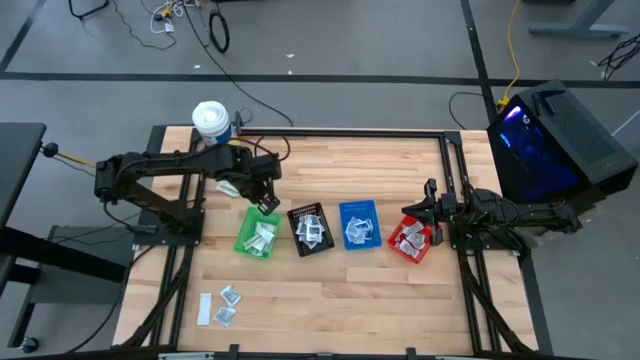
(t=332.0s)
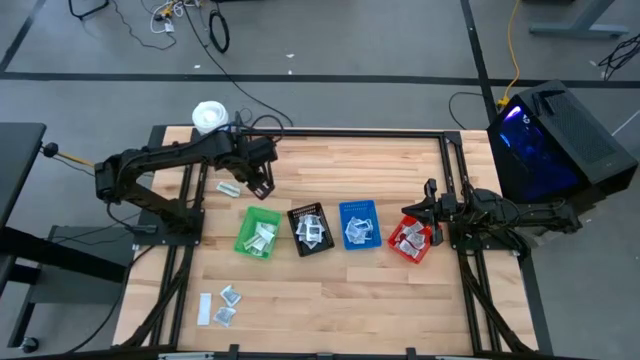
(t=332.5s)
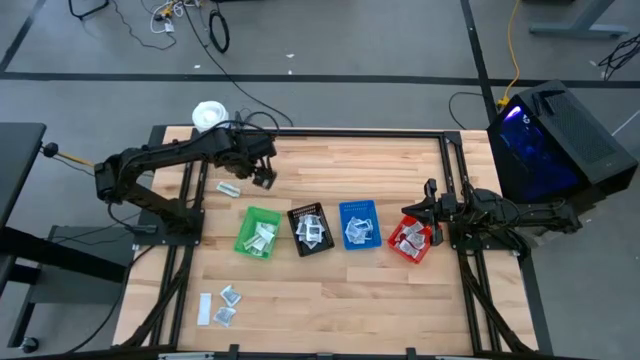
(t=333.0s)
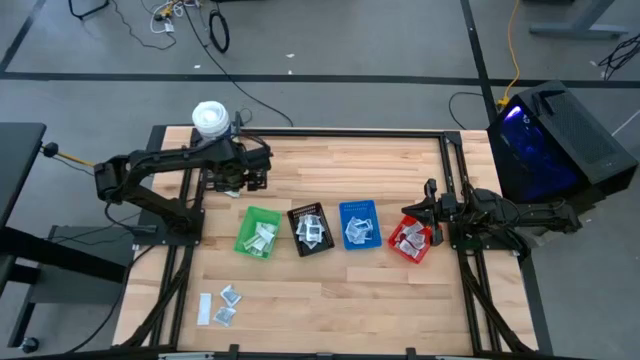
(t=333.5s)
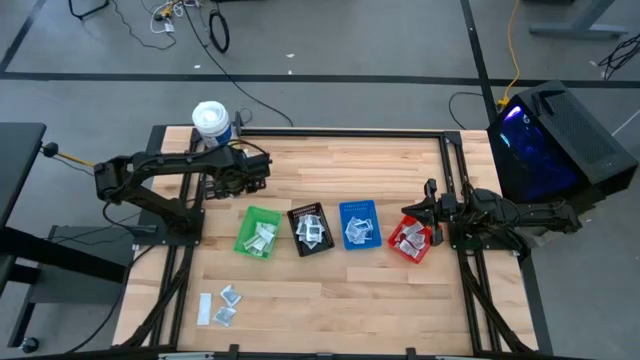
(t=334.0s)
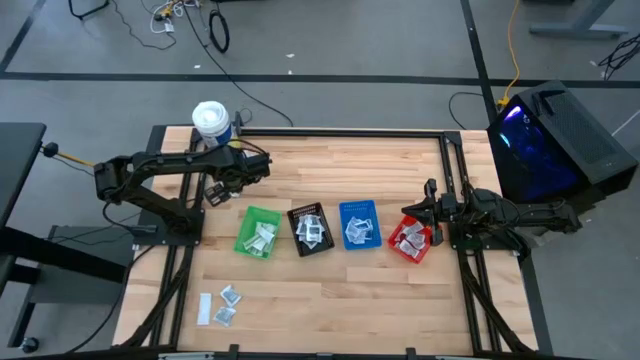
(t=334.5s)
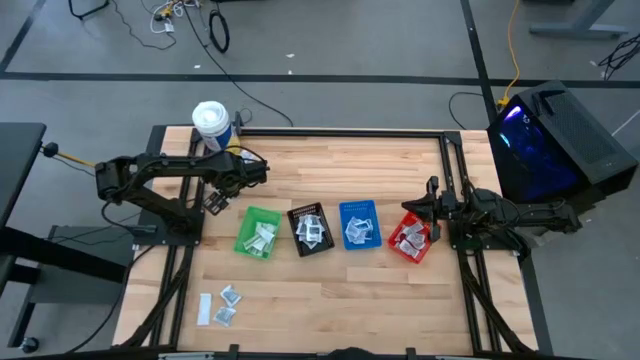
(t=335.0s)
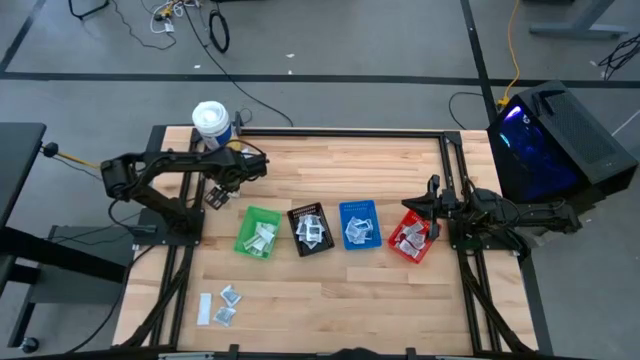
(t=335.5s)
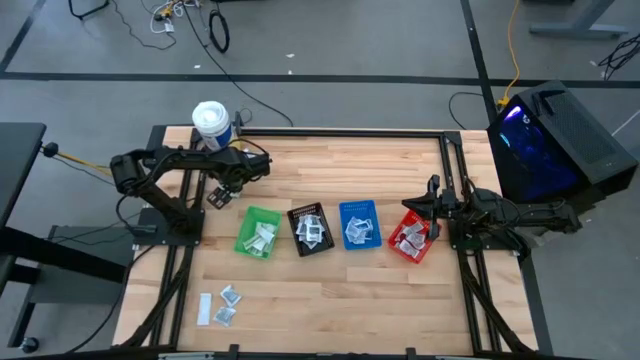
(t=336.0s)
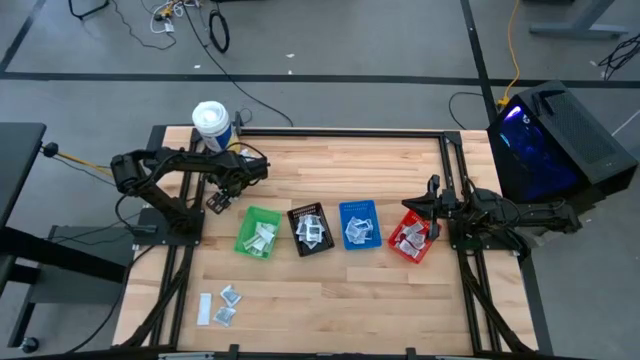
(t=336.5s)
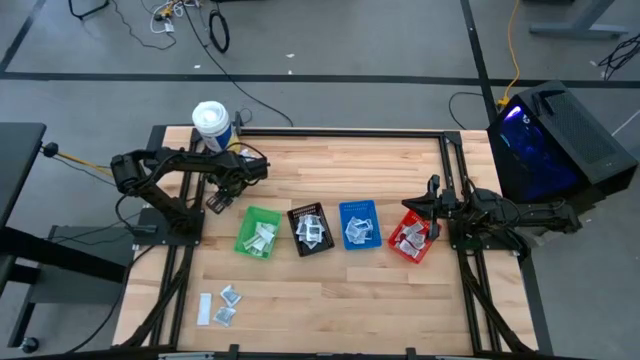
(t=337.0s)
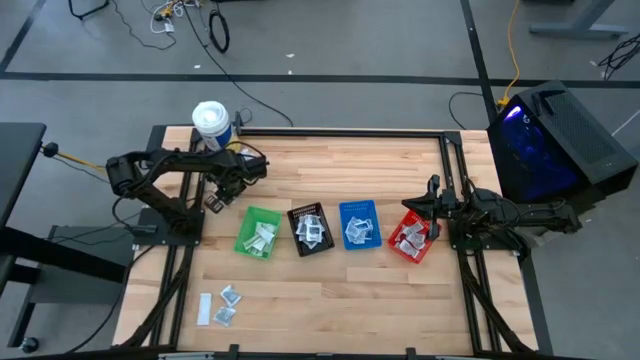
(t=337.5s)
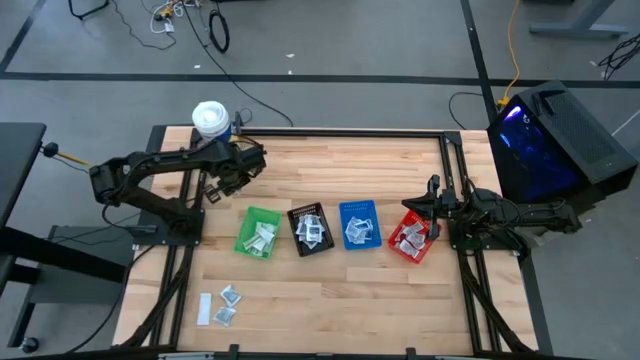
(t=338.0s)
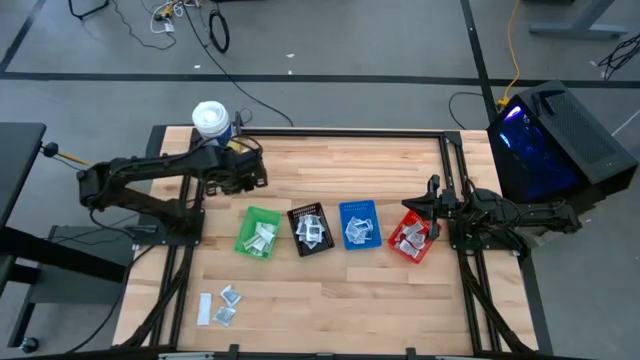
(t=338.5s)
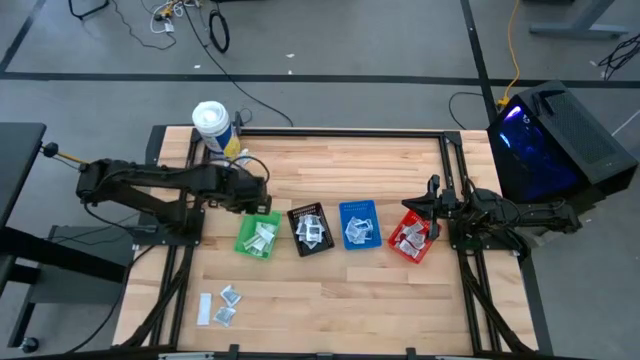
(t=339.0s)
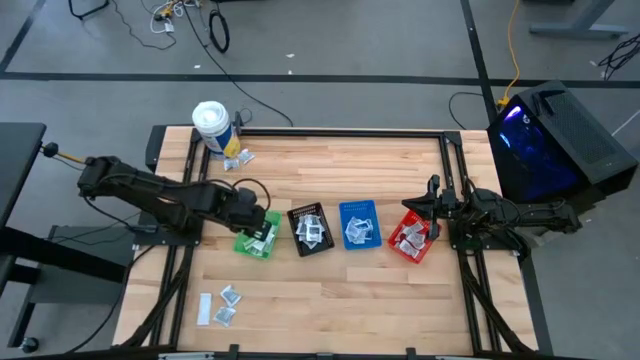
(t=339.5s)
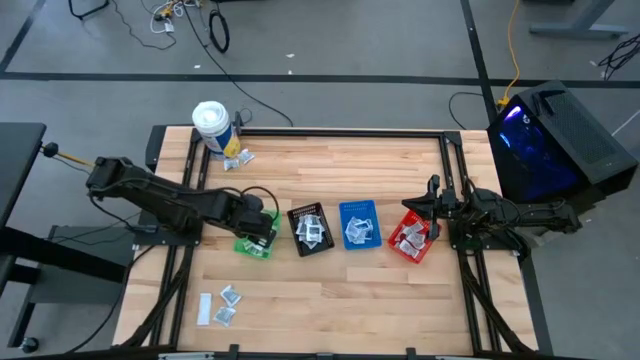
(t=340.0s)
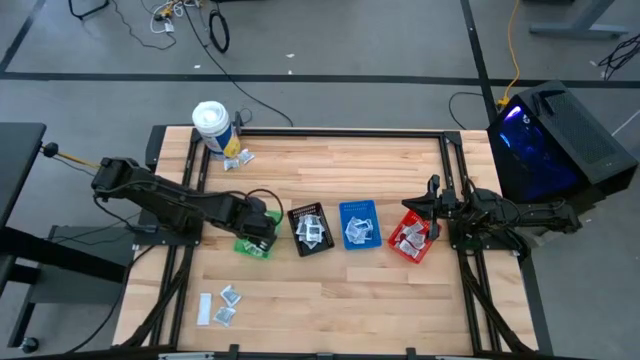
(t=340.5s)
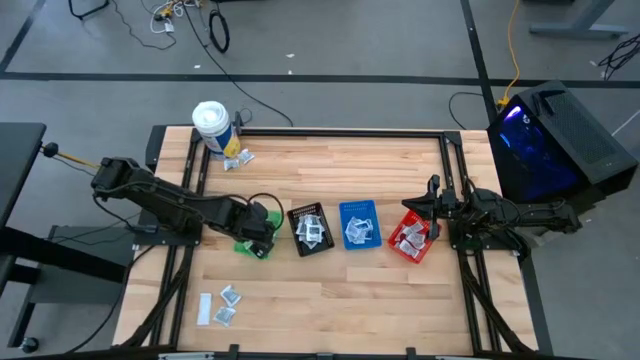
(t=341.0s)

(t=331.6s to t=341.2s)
Task: Pick & Place First Aid Supplies
Put the bandage into the green basket

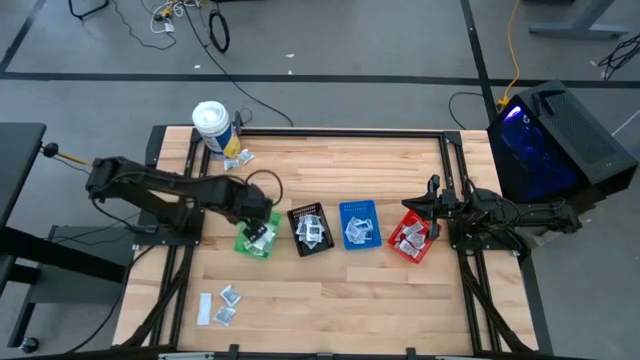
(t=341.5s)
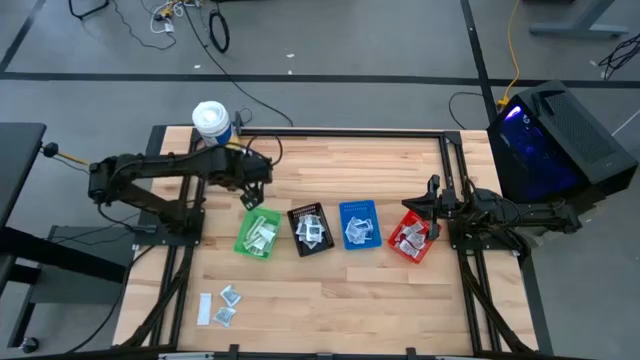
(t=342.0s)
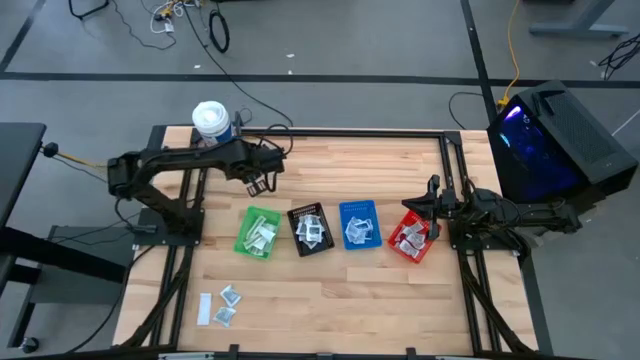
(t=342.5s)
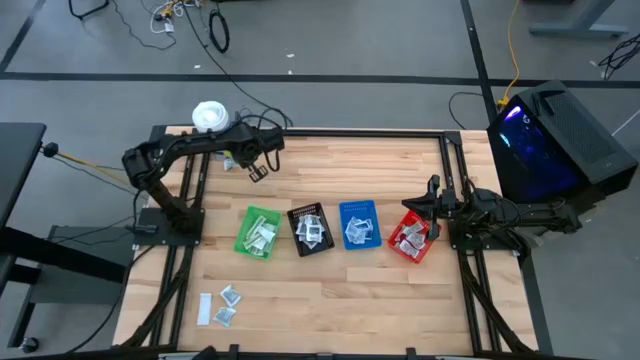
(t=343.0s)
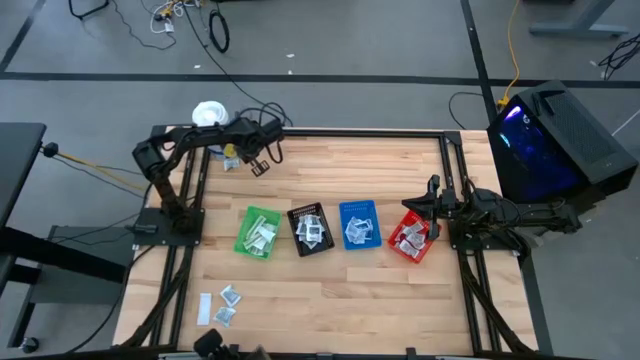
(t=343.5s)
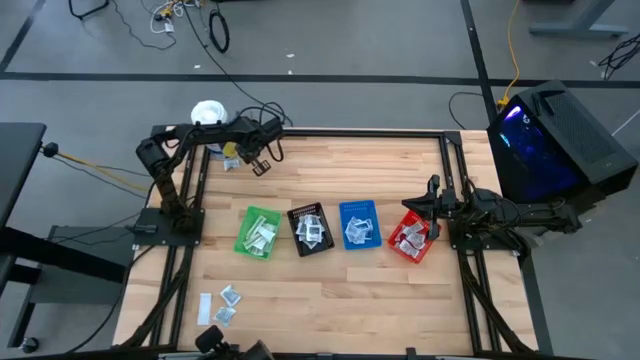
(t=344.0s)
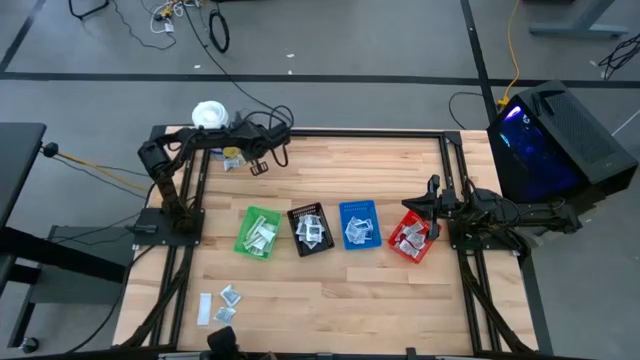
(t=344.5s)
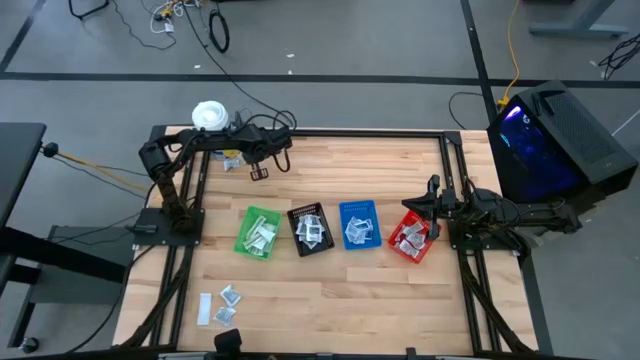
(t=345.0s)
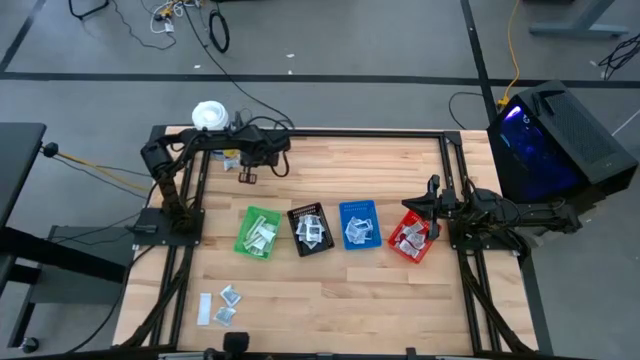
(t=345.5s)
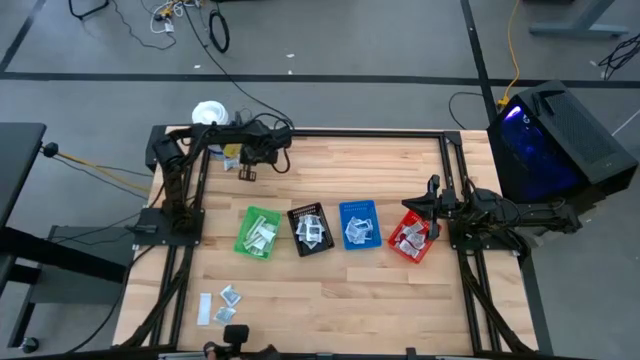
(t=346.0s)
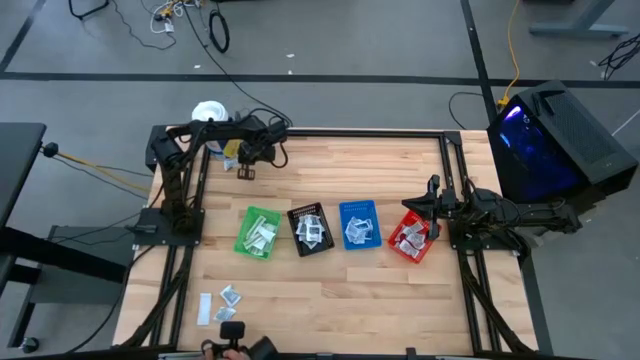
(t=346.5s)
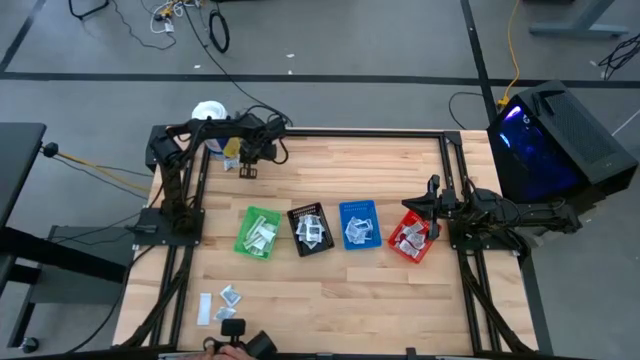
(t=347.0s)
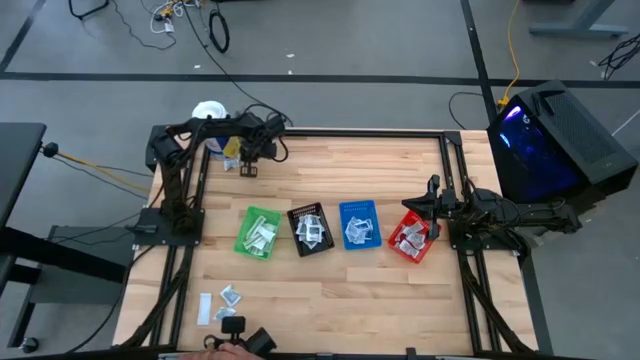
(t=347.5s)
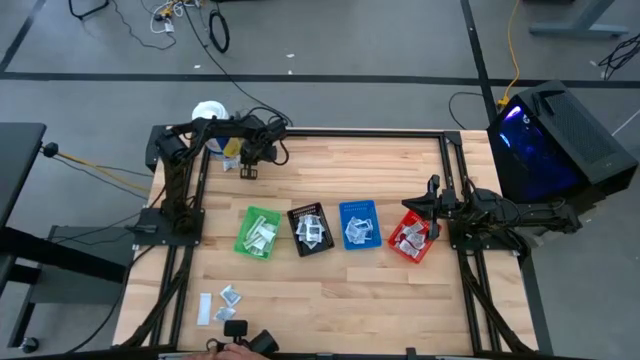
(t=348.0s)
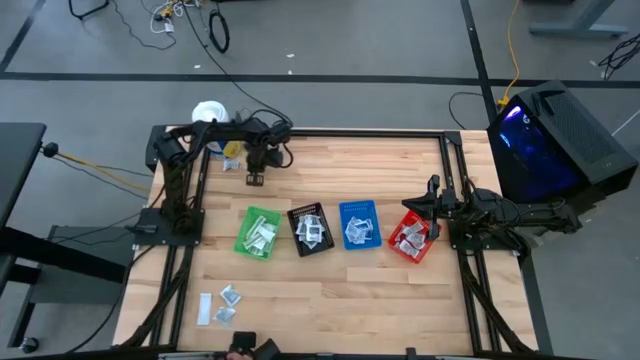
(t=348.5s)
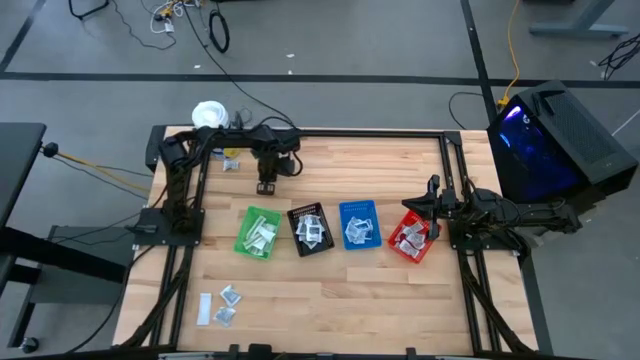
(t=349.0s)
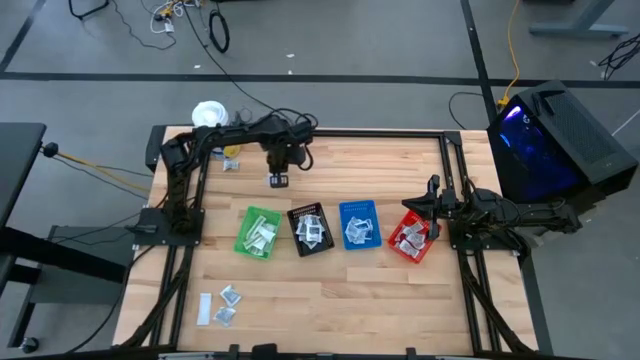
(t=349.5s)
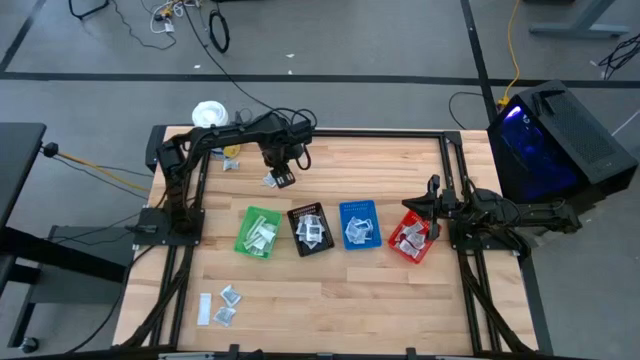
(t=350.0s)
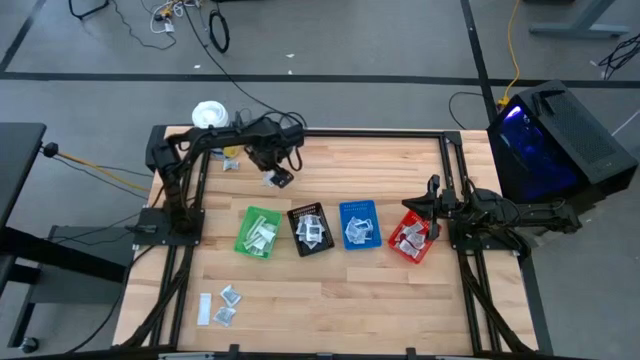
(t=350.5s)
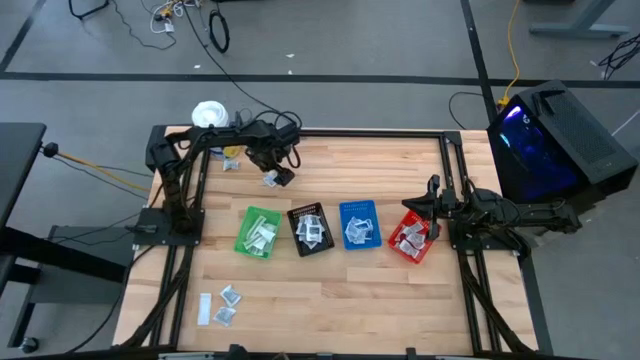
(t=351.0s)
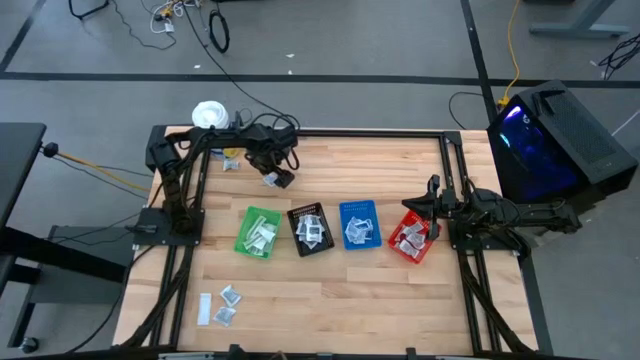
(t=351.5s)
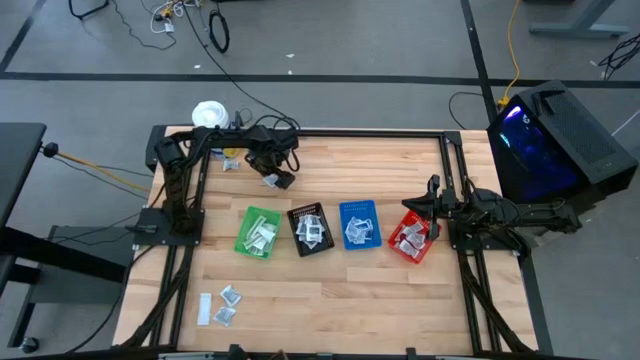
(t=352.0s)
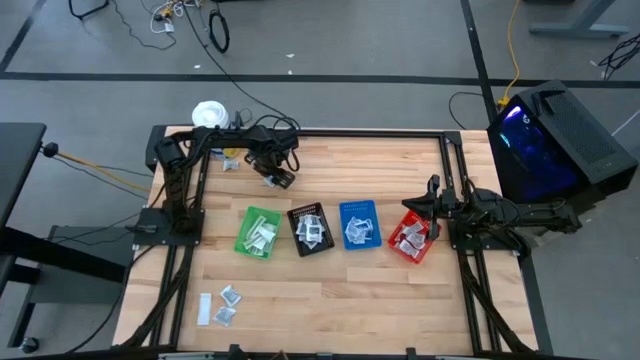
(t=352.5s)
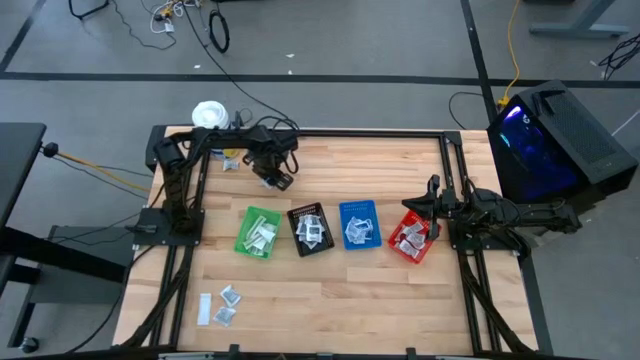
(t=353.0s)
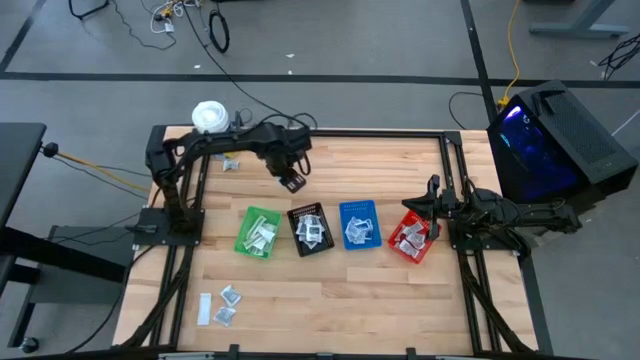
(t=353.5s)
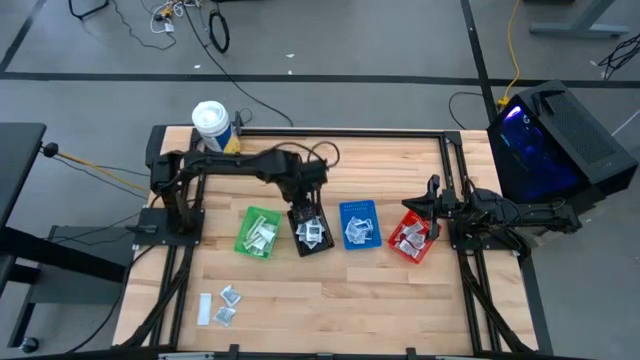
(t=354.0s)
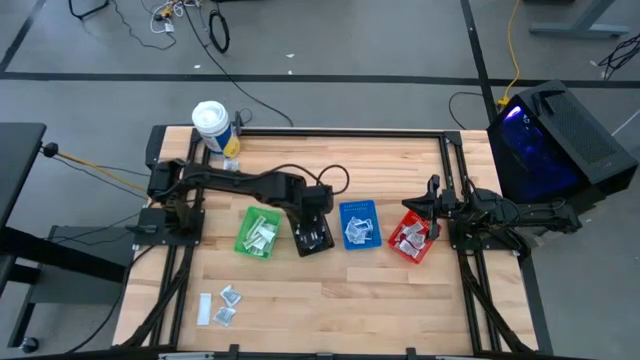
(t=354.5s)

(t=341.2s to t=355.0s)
Put the towelette pack into the black basket
